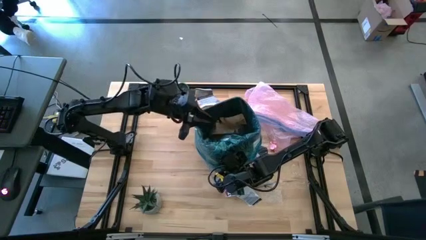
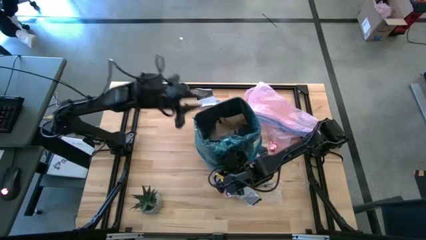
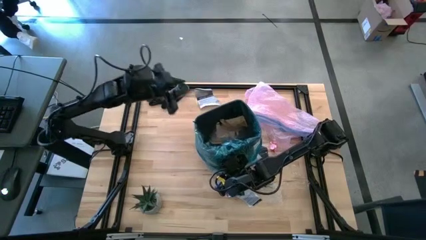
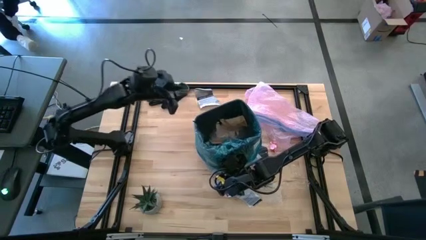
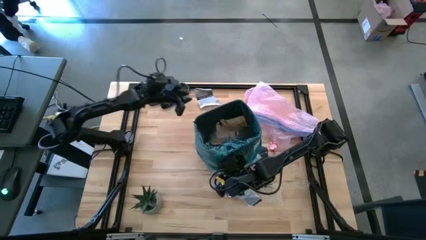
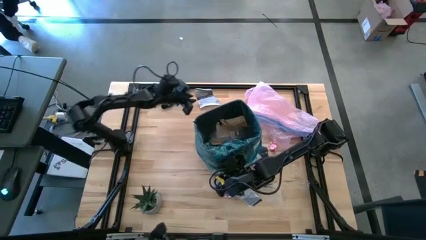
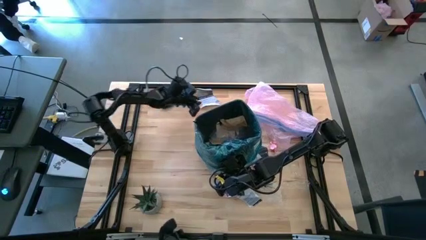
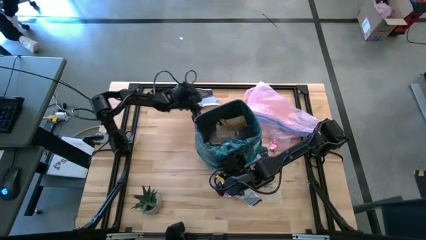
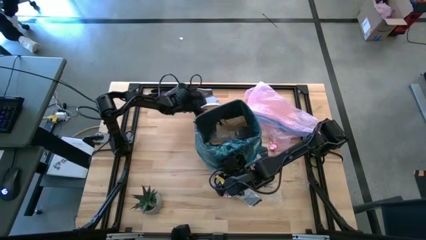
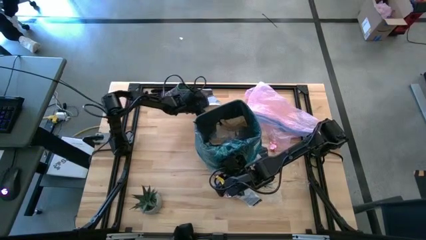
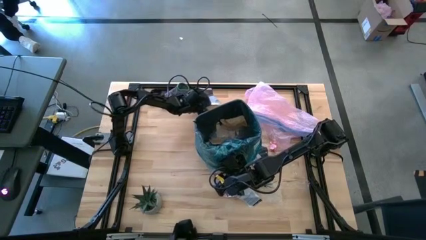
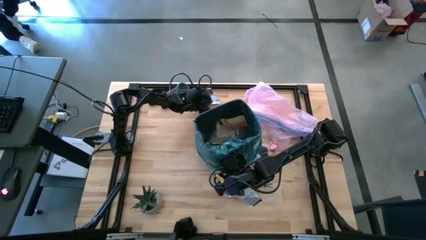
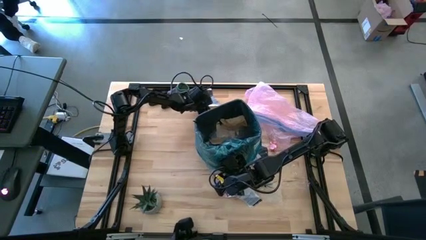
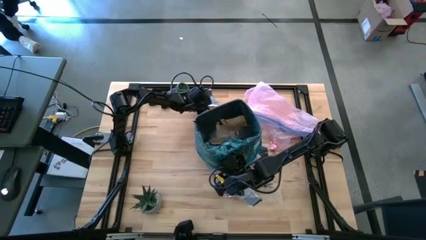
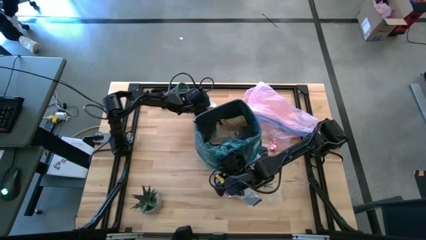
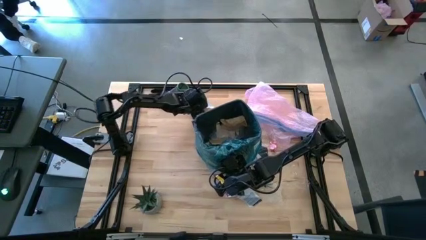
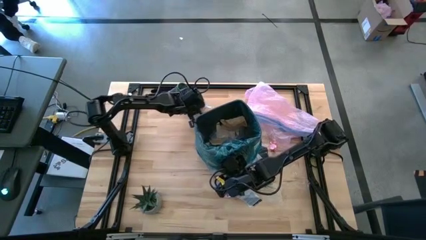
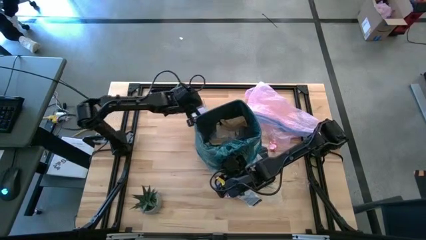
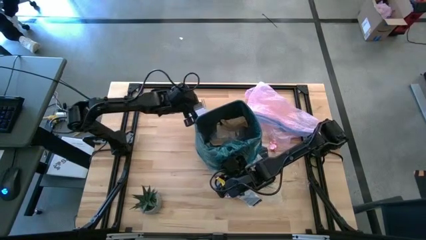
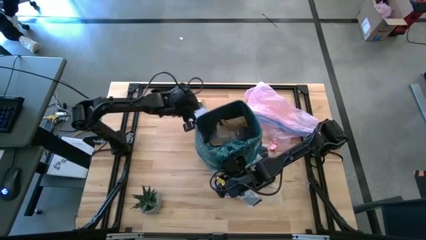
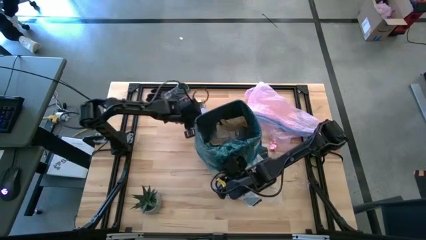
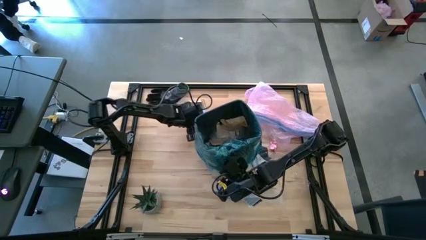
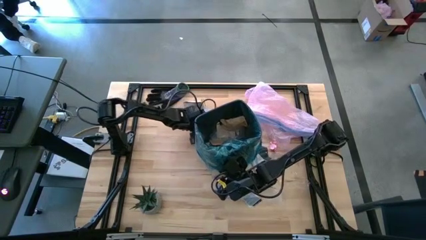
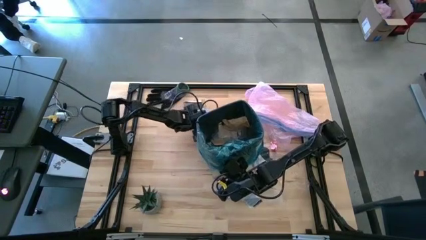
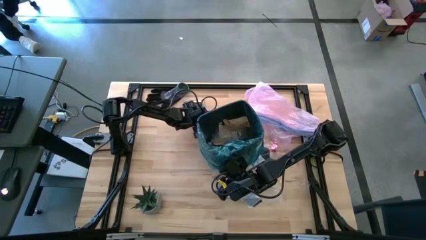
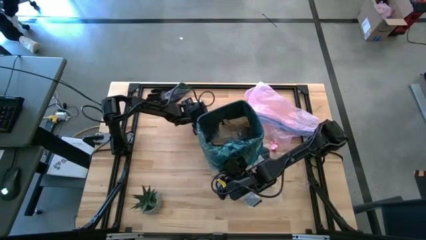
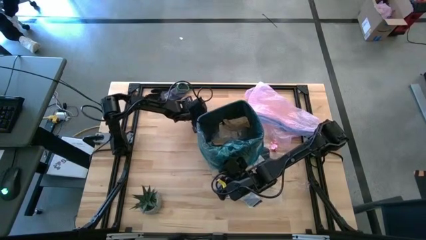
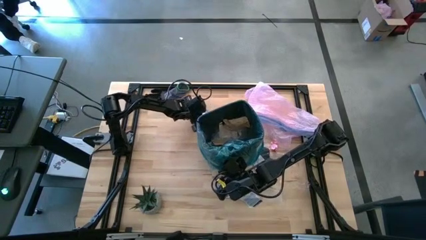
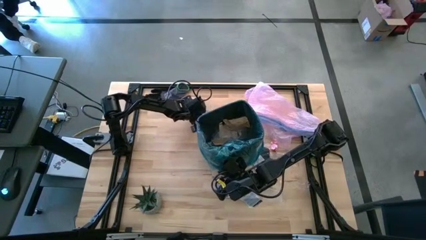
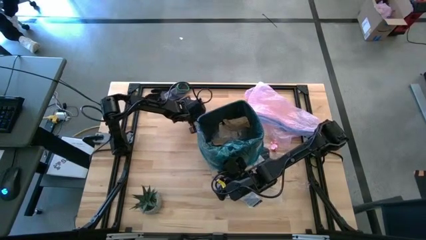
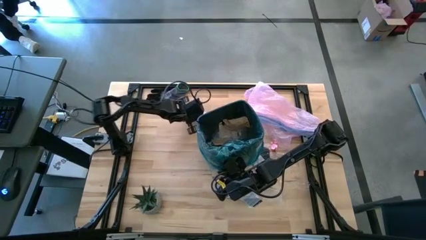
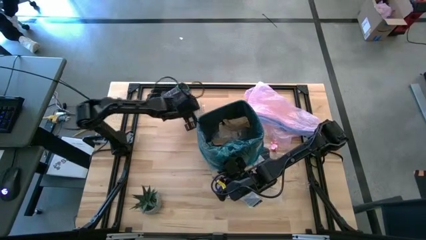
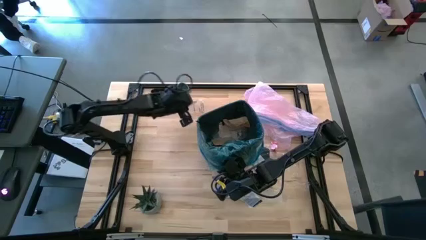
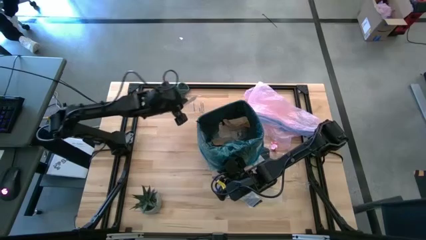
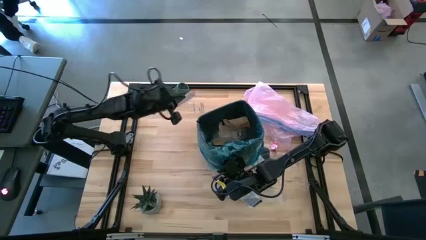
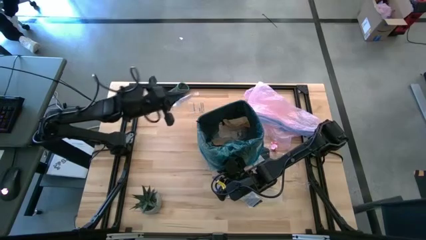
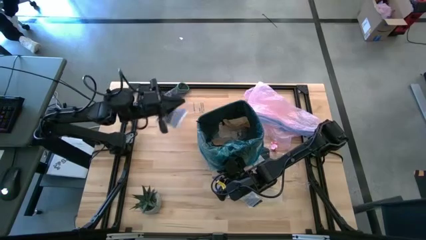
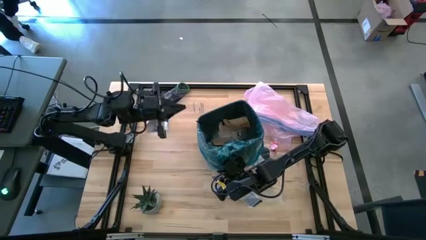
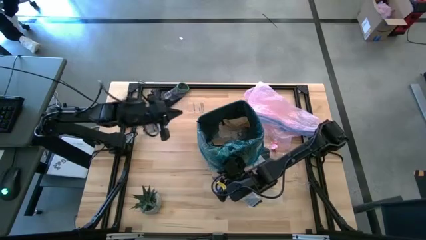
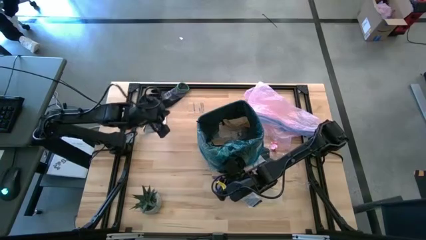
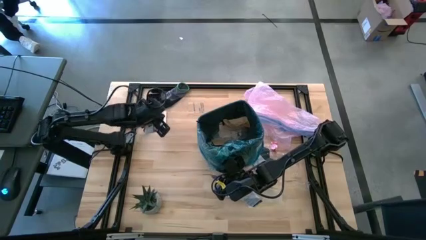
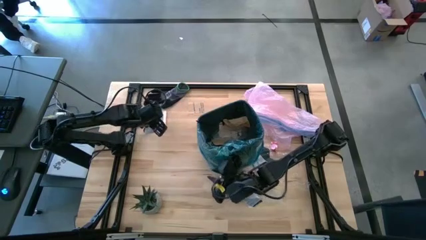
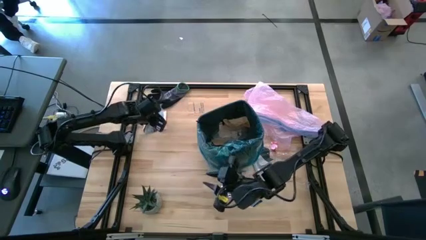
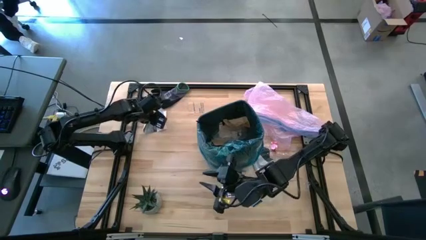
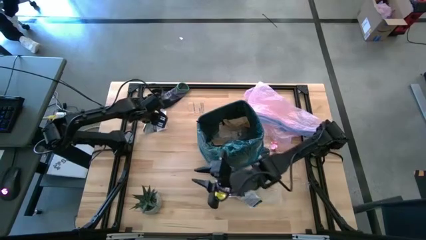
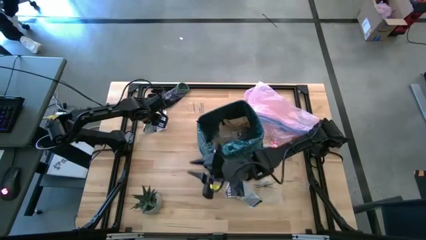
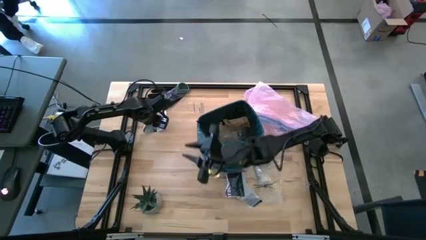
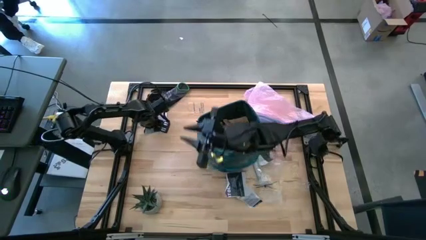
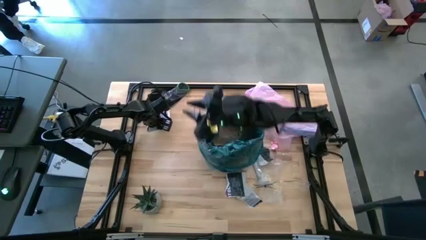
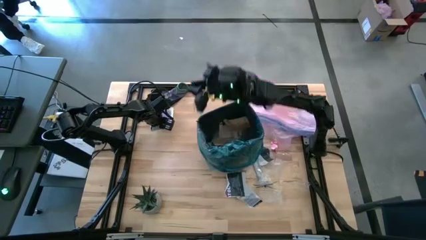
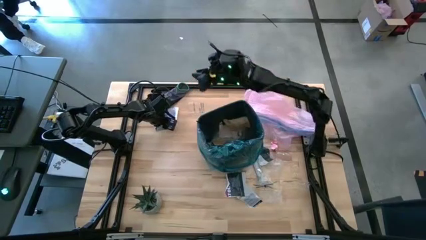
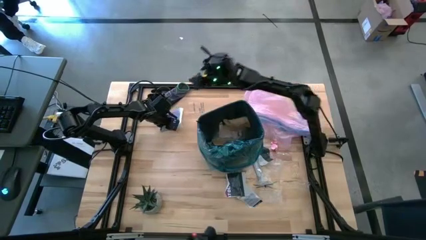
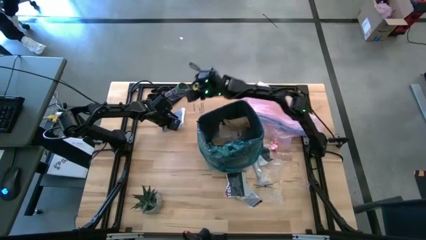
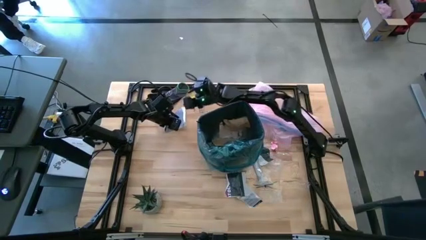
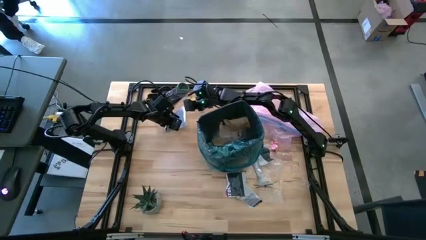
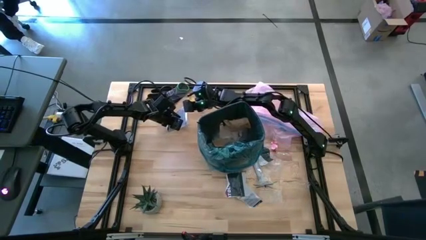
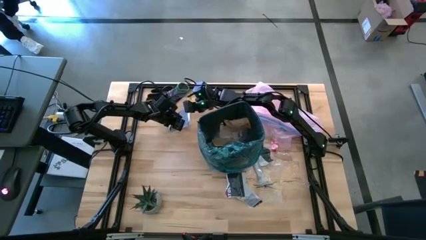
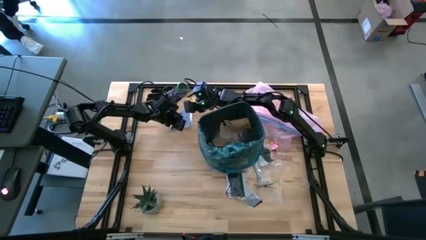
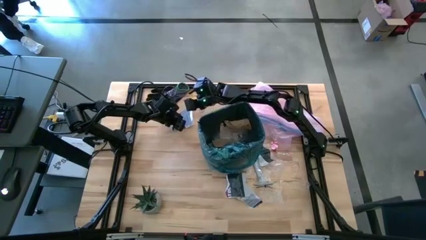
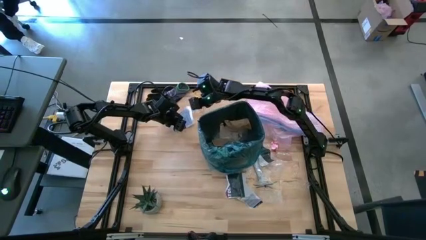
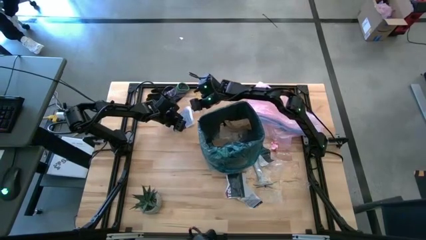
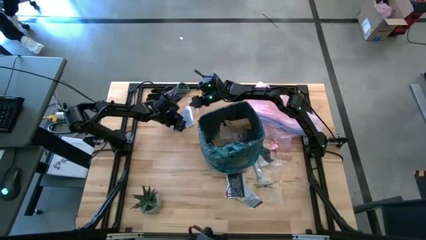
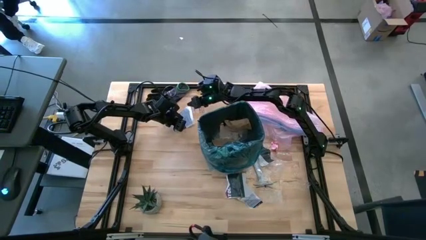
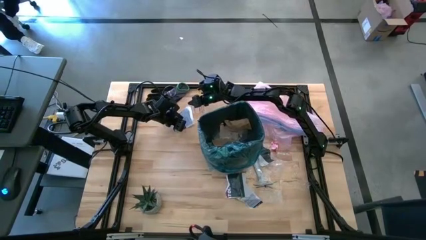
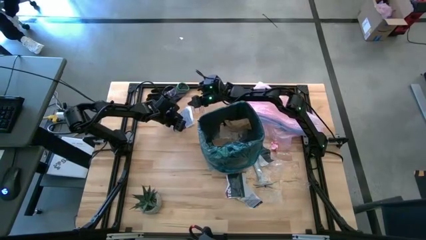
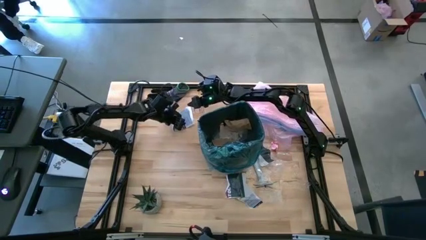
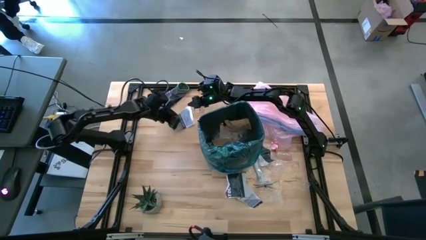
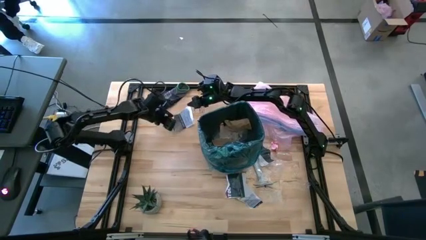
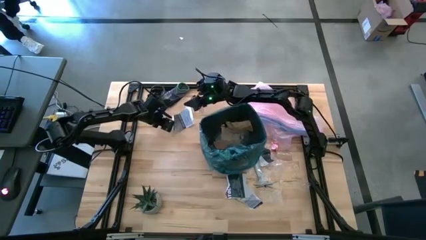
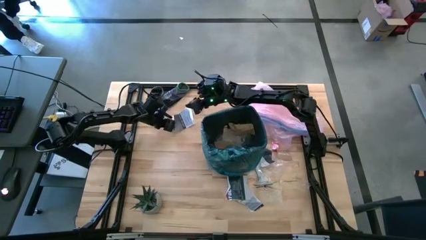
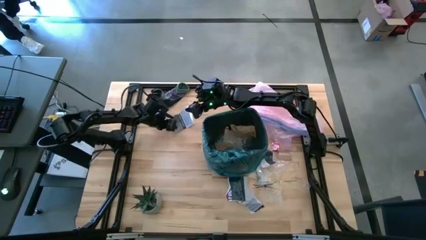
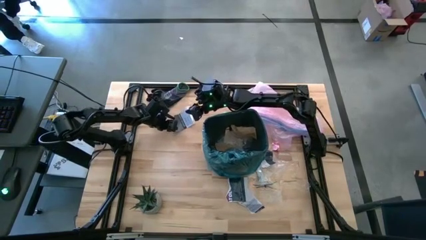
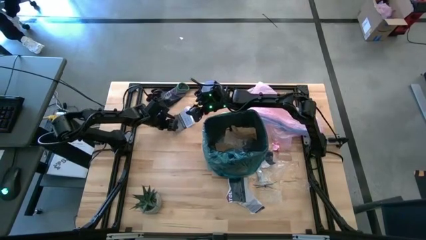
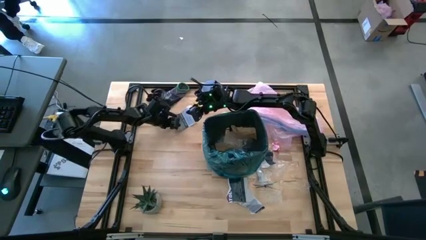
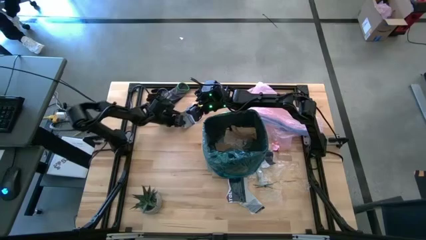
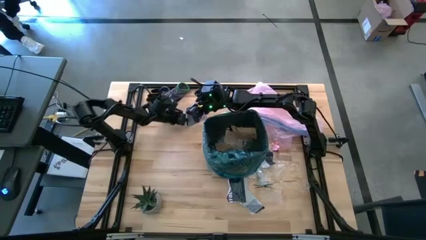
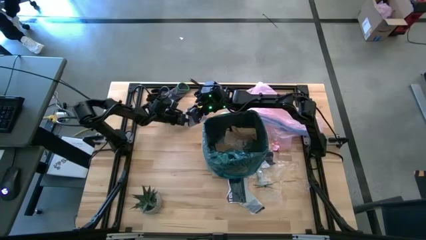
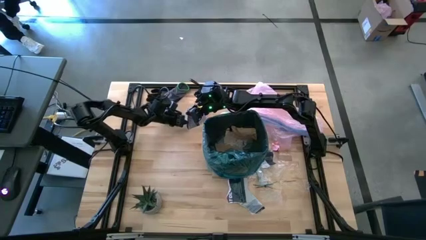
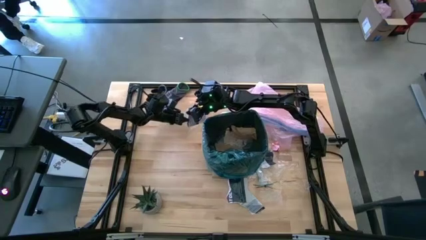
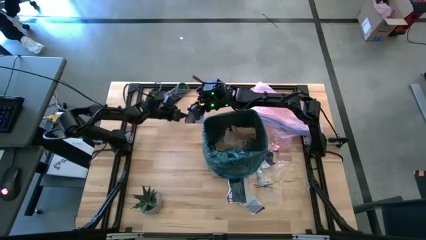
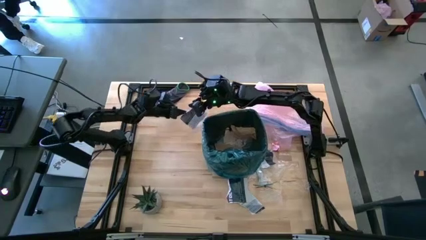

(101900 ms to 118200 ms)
Task: place trash/remove bag and relplace
Put the printed paper into the trash bin
